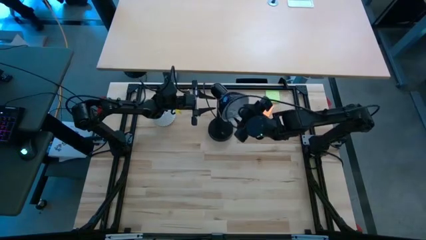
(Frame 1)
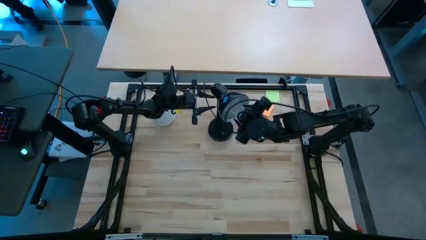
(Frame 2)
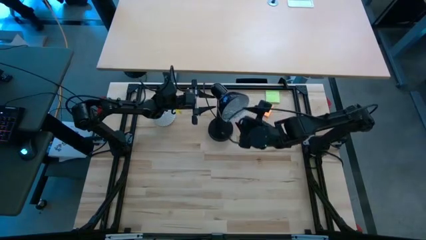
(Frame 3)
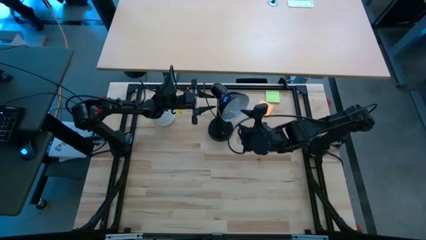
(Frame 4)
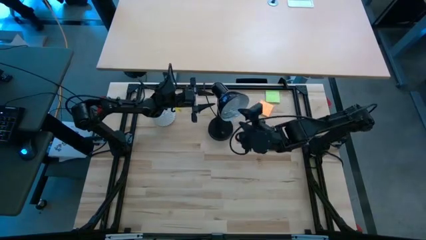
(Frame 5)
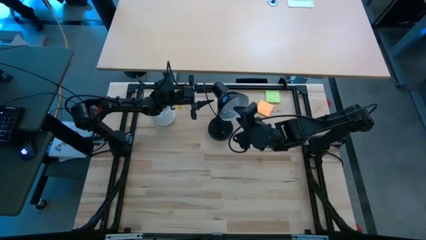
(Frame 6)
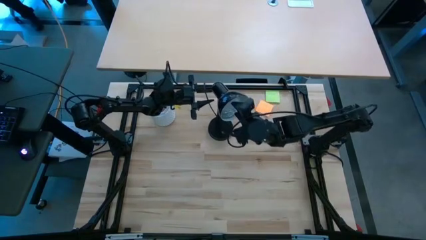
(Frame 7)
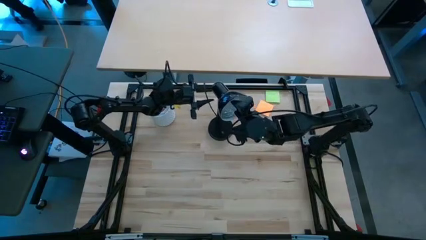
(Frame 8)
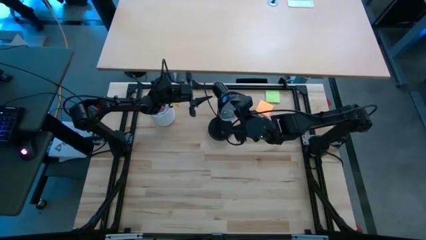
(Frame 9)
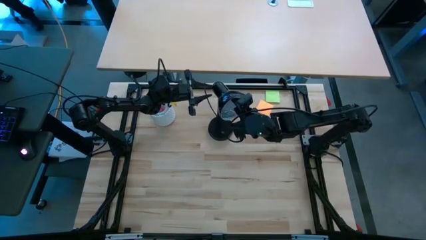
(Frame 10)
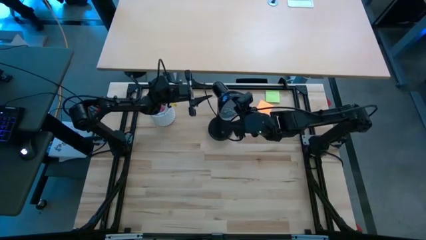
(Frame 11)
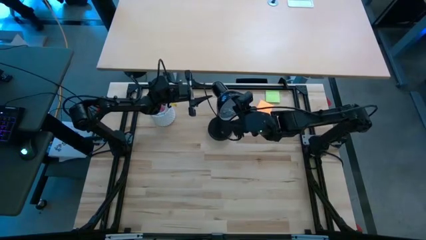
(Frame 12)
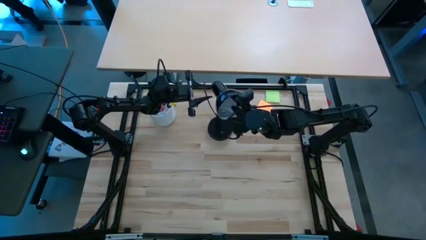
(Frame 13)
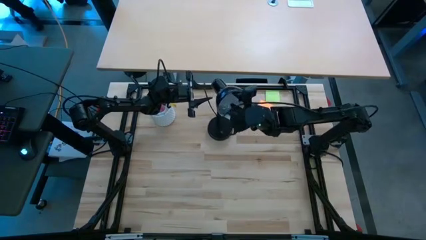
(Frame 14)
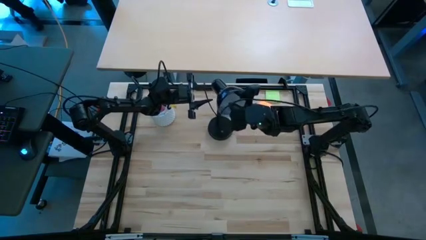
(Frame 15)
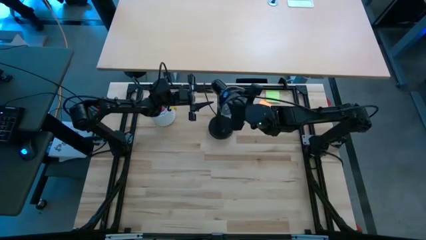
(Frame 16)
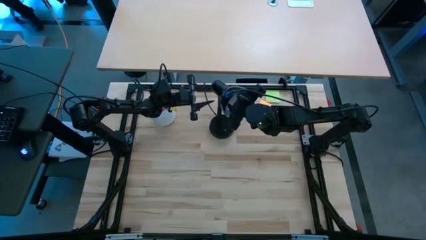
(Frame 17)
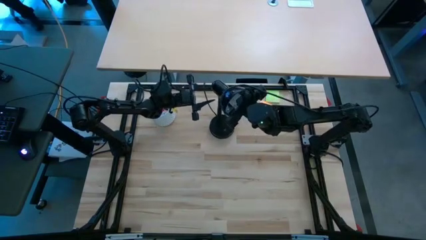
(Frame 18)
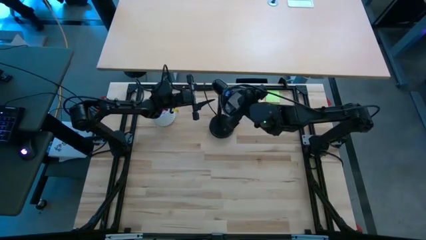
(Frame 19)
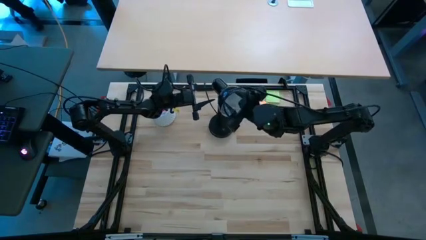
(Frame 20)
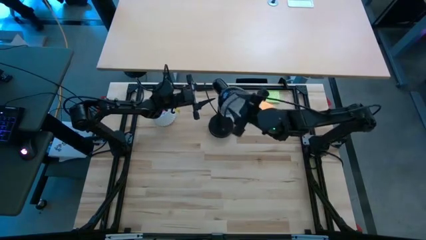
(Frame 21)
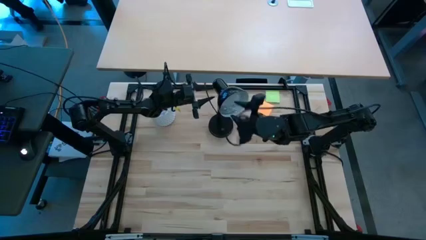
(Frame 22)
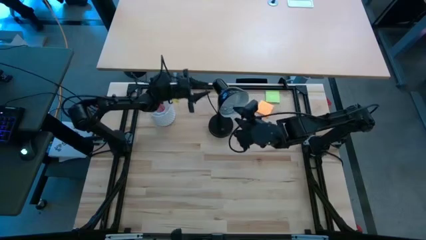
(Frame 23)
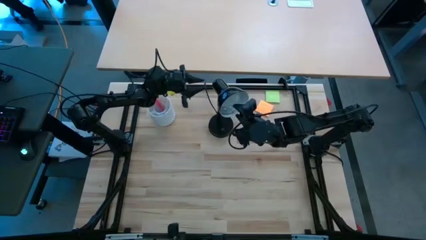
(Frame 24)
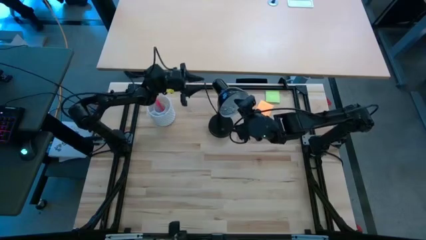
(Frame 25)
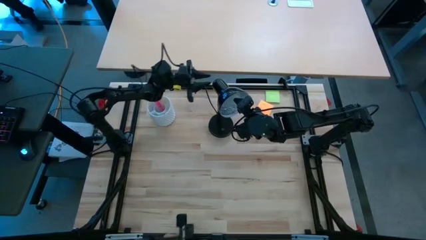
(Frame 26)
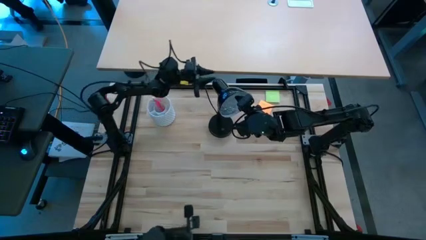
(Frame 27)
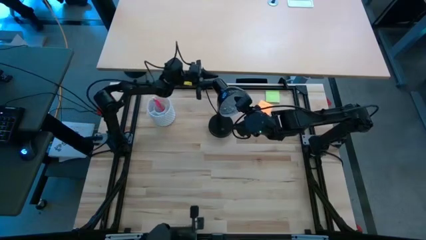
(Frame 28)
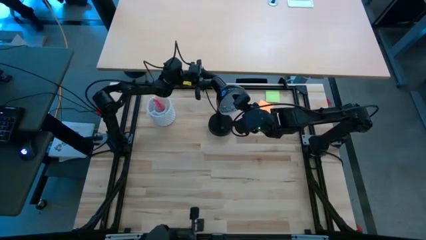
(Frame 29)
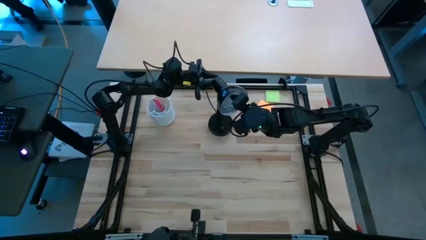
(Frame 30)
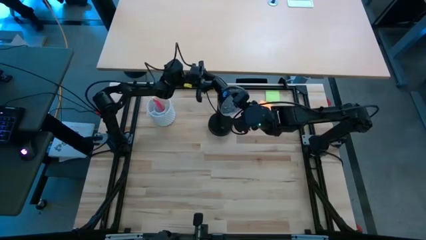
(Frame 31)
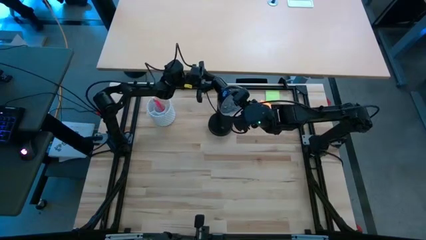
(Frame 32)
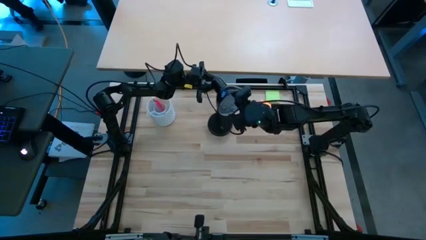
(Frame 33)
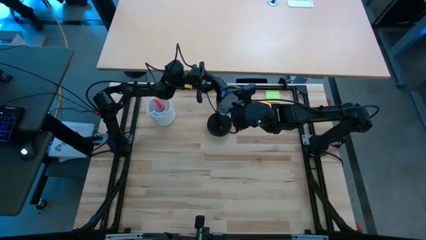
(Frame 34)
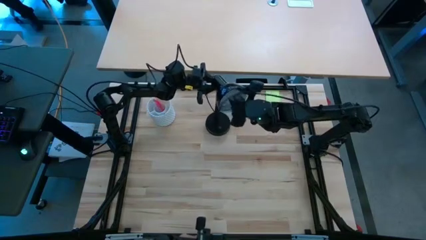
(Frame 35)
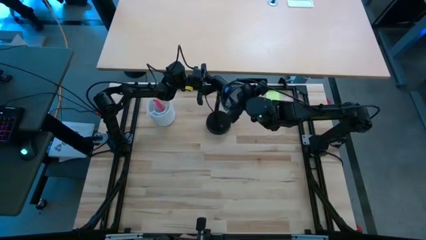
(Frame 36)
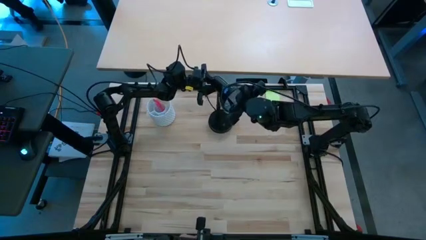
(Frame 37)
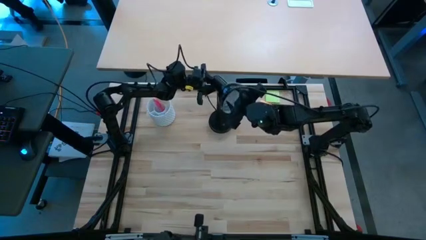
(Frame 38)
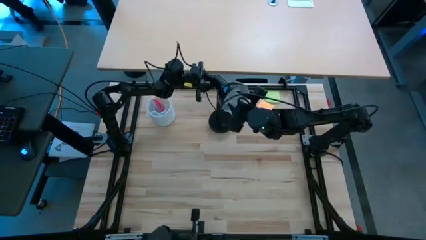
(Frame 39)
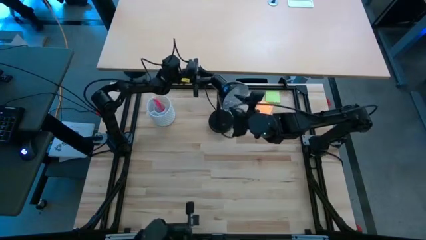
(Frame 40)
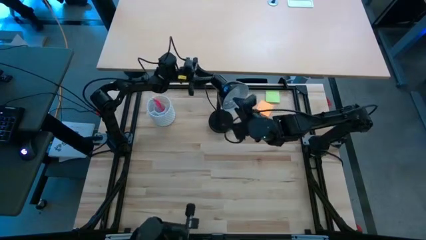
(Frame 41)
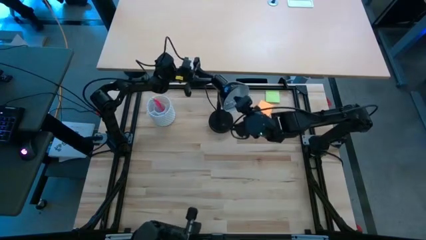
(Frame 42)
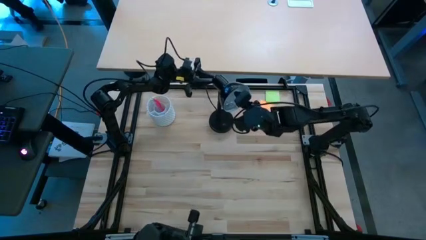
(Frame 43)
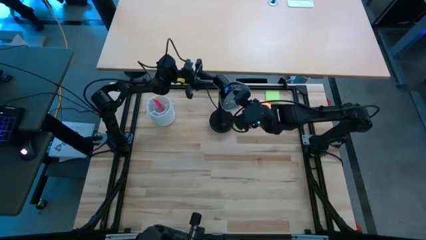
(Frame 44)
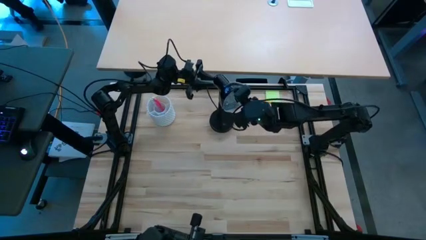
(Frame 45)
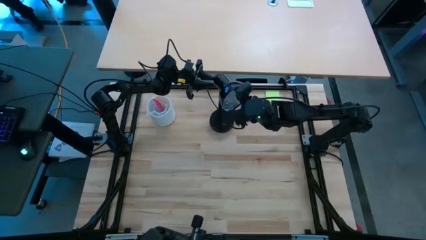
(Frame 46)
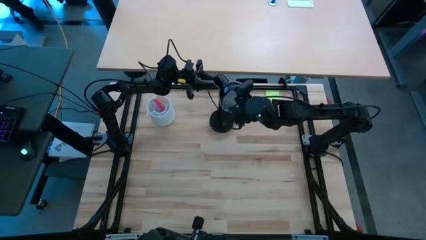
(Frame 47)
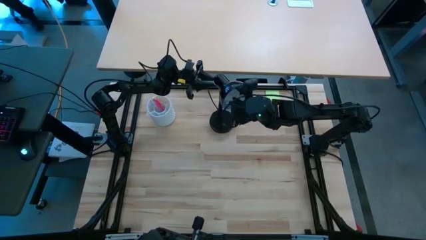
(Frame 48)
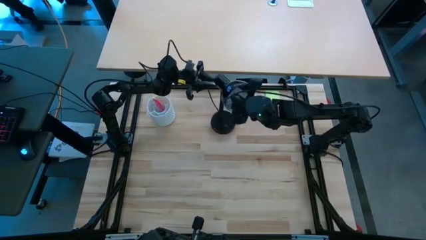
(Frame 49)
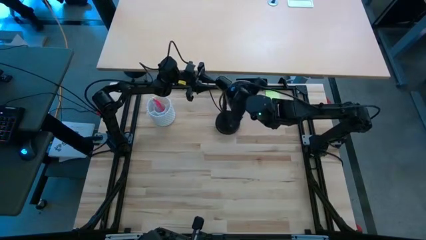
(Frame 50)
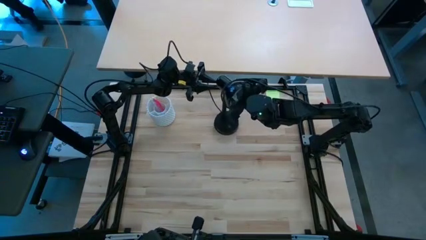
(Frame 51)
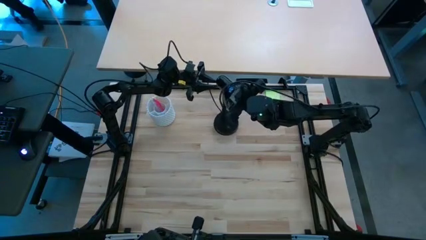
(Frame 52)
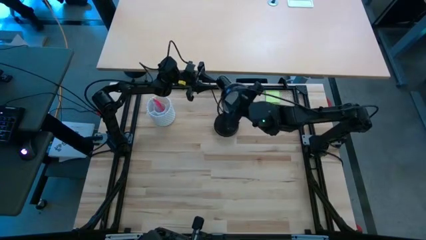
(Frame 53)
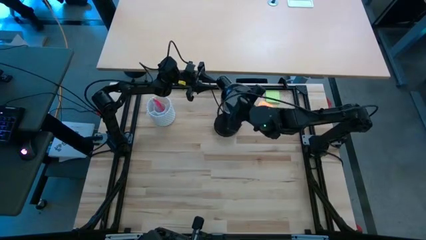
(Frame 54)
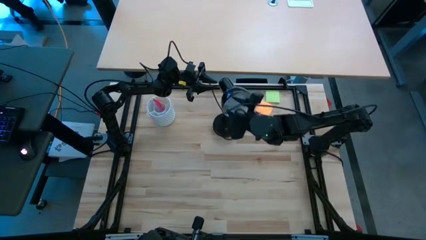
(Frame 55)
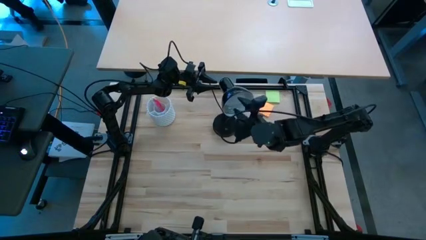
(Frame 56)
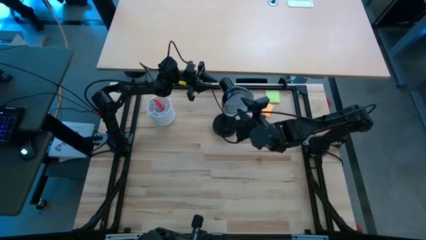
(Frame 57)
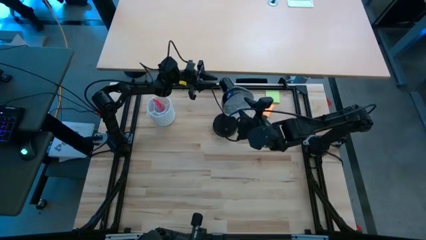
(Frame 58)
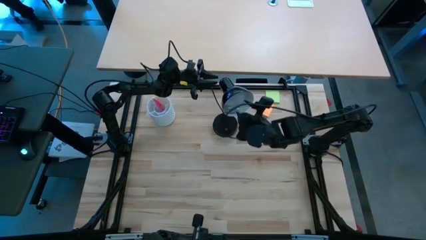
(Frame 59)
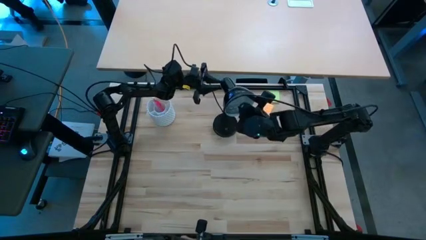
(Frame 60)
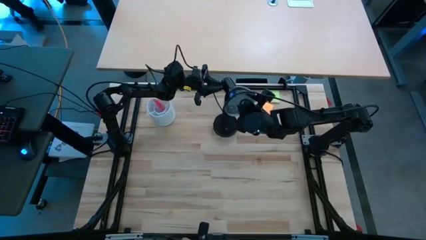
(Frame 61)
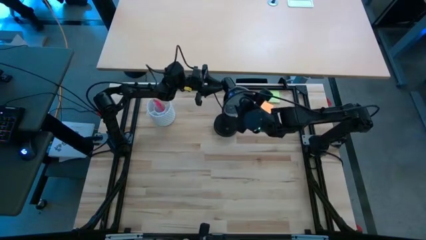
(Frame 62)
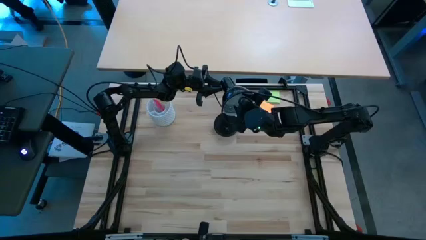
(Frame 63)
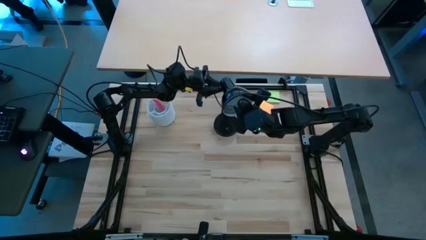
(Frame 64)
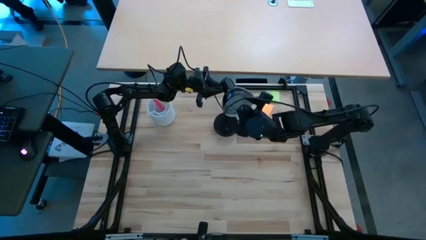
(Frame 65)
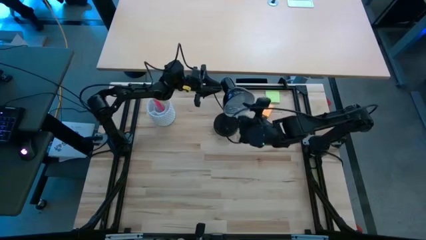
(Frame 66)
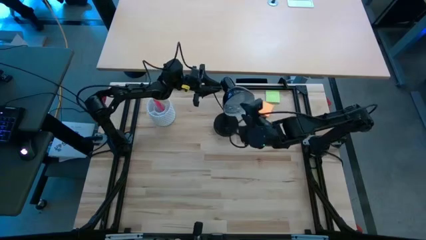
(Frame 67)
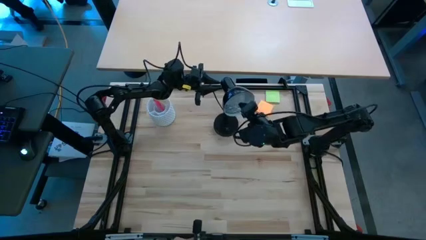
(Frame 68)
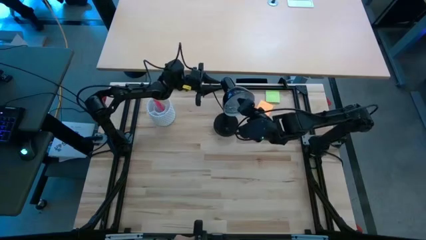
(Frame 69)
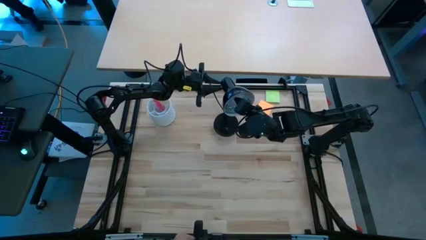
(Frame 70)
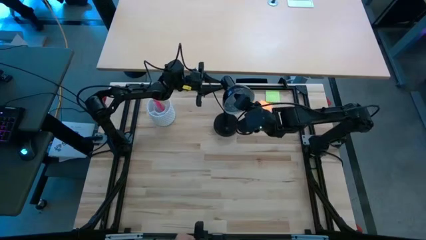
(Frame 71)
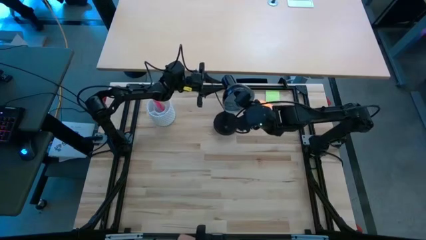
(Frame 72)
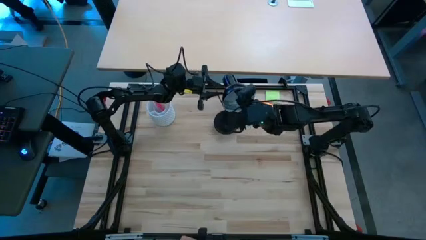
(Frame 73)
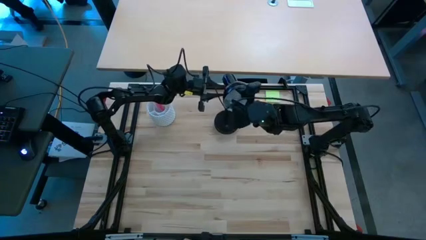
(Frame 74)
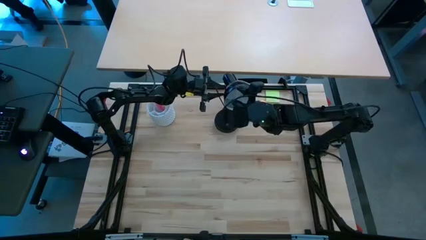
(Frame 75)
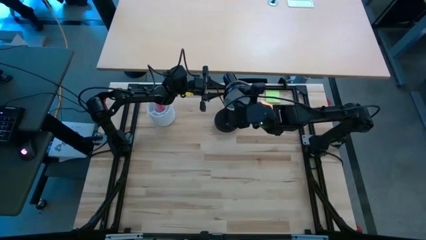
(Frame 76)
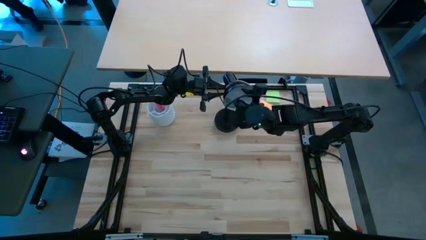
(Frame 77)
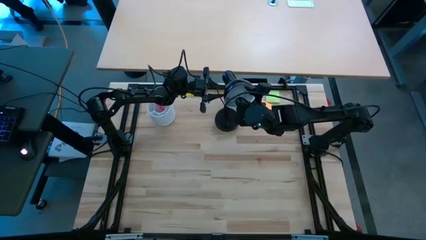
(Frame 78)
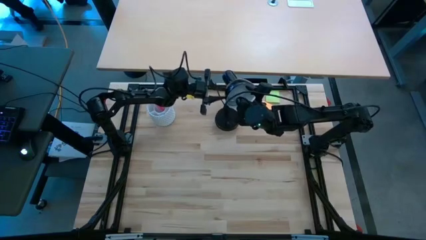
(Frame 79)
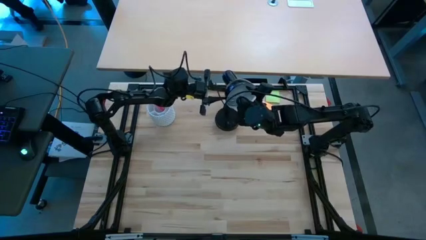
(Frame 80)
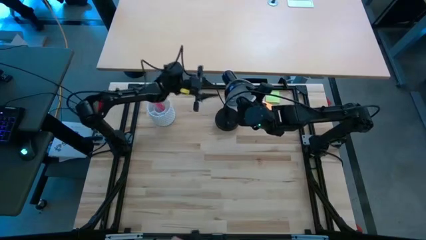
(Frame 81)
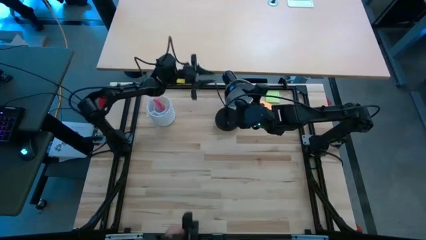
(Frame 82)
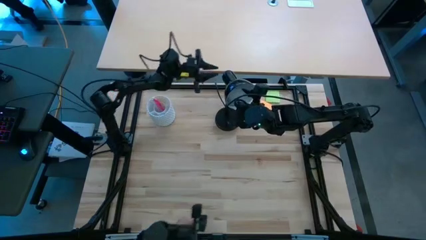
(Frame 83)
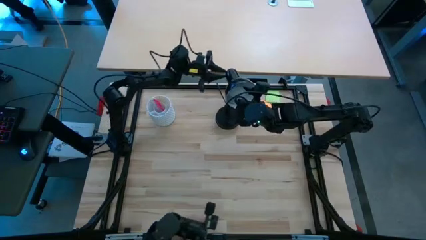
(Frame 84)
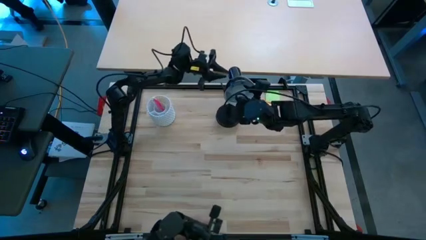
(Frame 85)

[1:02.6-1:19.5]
Task: Screw lightbulb
Insert the light bulb into the desk lamp
